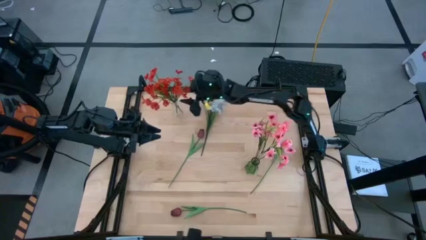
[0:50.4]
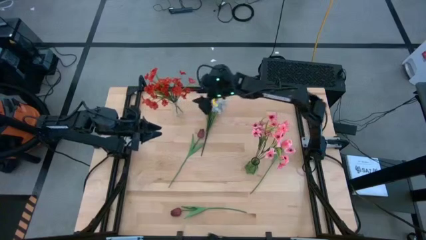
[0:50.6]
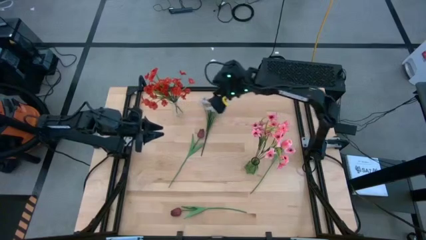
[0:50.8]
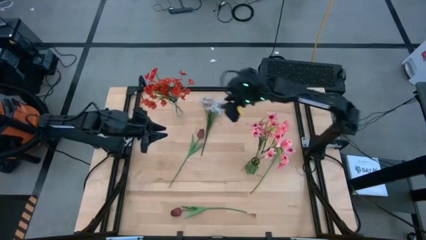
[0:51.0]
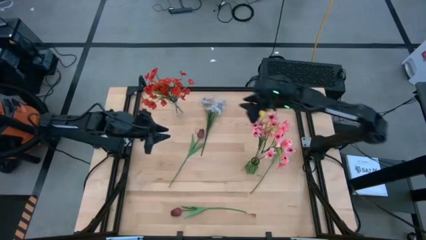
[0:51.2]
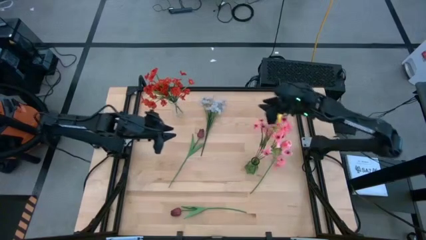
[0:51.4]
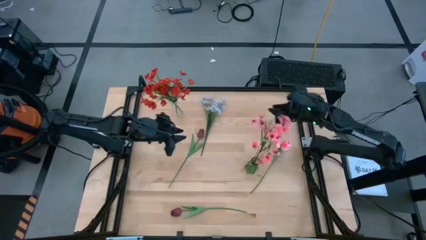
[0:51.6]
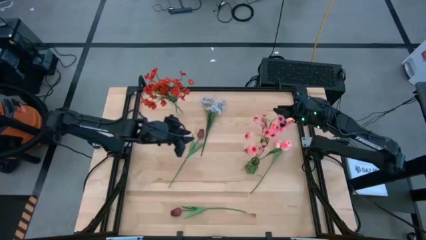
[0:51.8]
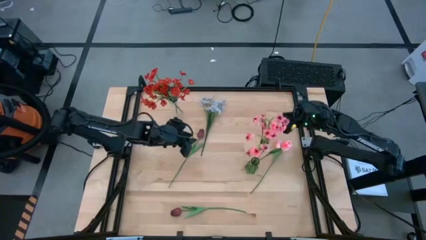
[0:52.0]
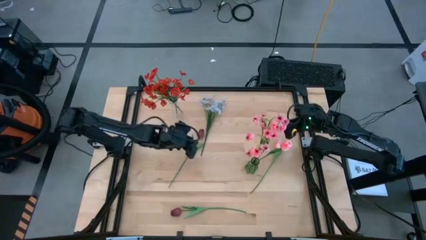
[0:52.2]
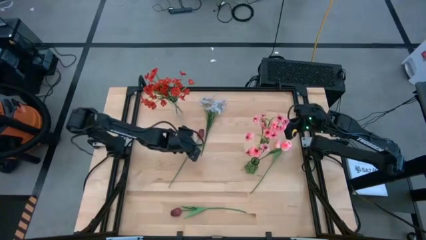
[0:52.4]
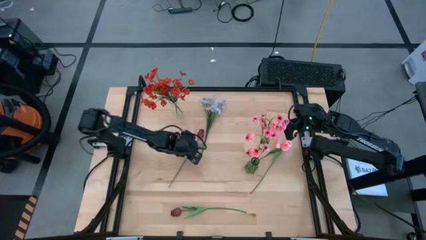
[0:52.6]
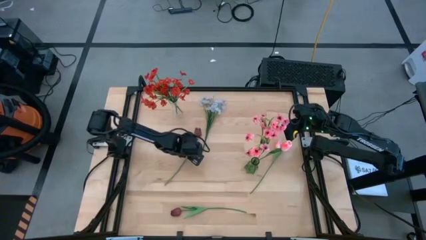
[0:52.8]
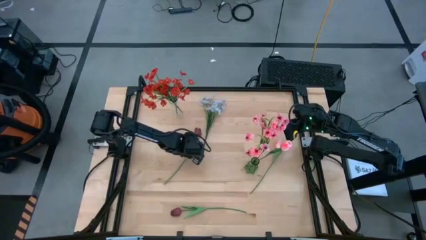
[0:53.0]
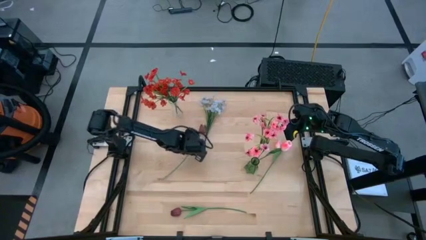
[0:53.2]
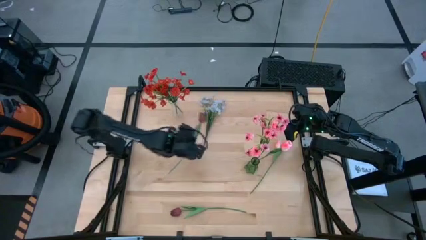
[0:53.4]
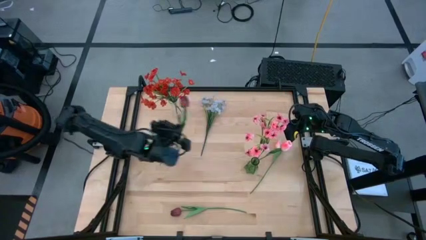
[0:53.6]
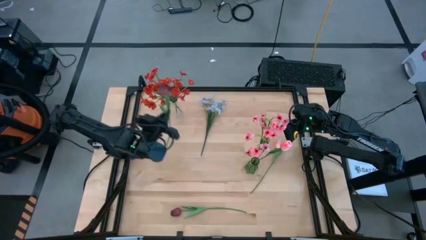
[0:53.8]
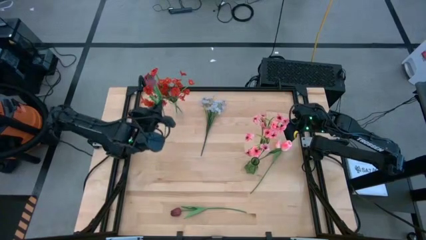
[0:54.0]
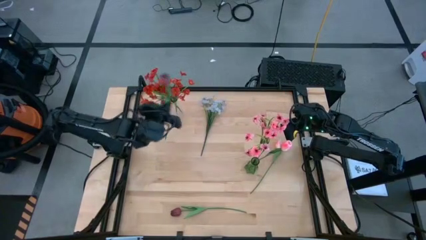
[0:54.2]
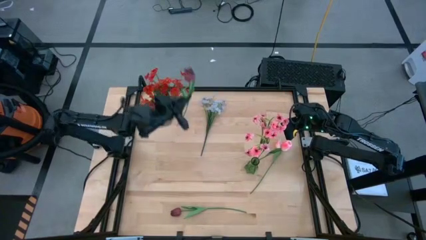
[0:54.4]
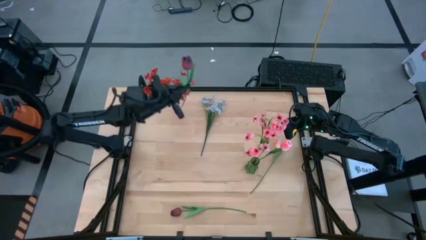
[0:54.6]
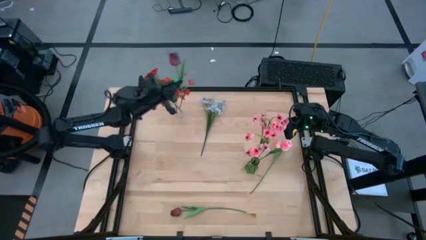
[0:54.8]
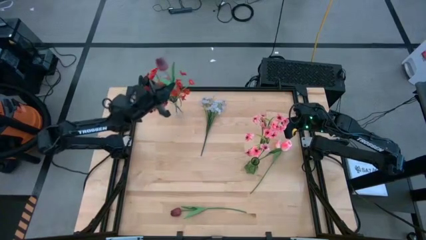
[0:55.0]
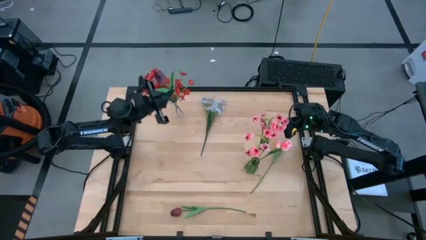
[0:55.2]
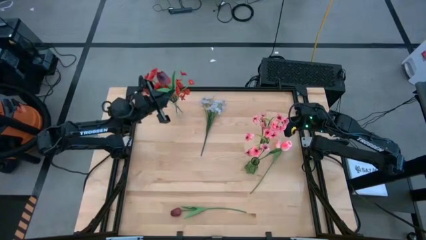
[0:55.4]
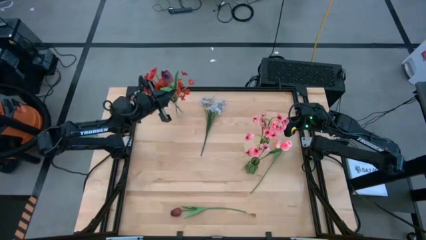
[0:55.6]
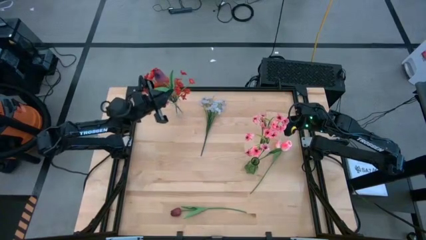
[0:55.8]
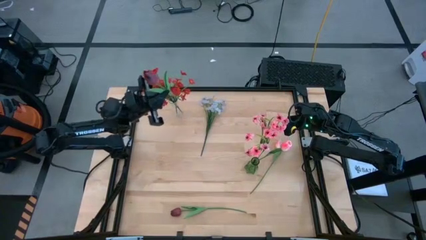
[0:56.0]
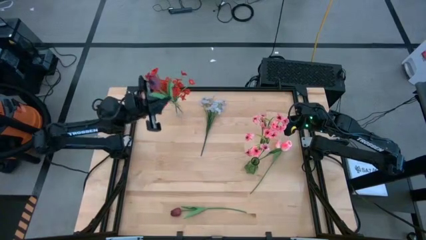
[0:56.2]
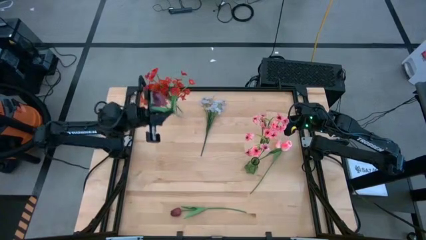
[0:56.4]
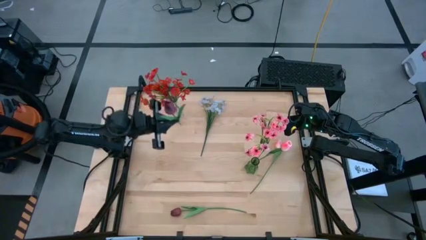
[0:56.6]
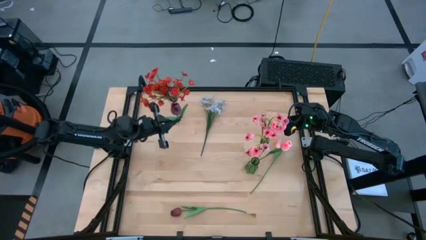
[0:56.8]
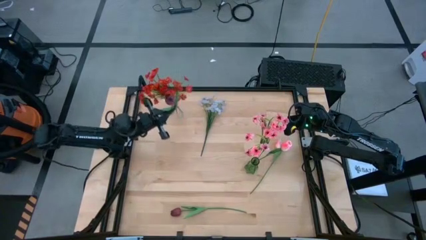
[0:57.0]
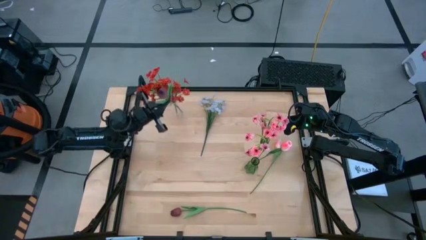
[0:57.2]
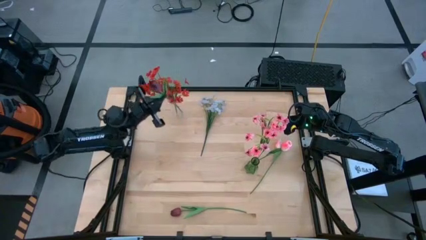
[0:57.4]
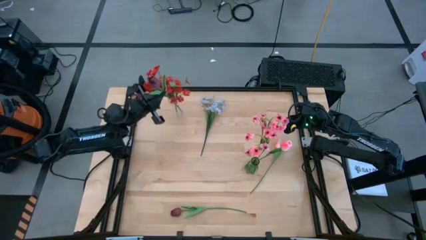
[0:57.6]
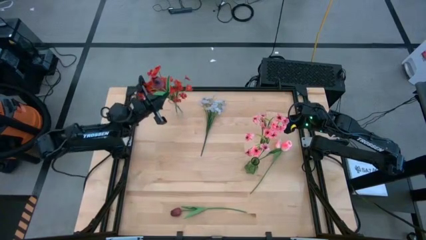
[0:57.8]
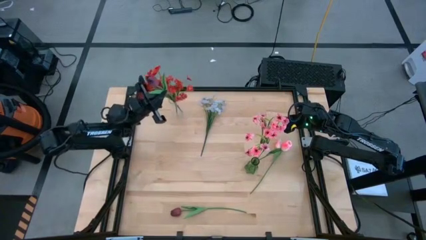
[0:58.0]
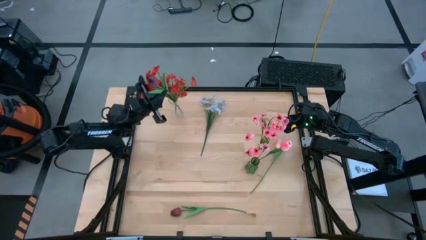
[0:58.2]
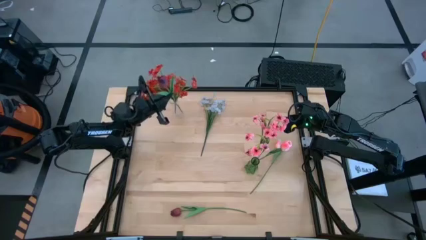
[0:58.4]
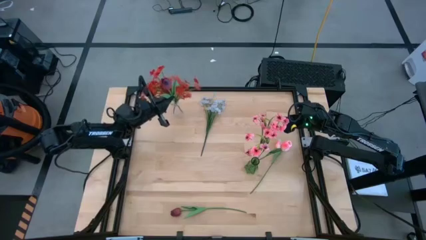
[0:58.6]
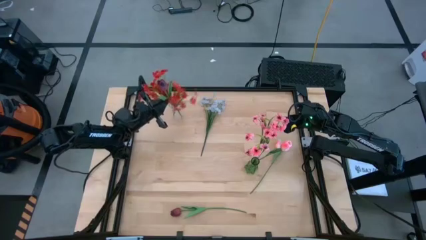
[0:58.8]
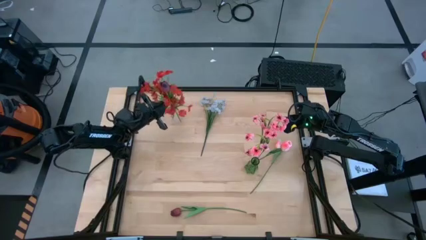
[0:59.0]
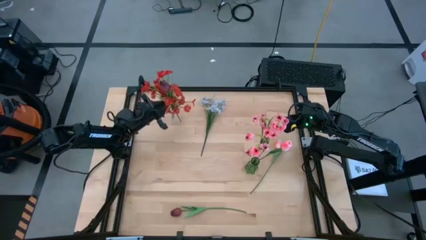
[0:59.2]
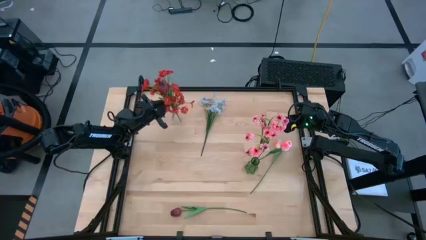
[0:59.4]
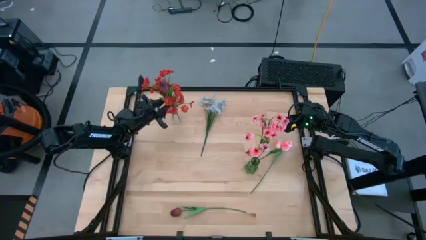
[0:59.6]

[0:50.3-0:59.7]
Task: Sort flowers into vase by color
Put the top dark red flower into the transparent vase

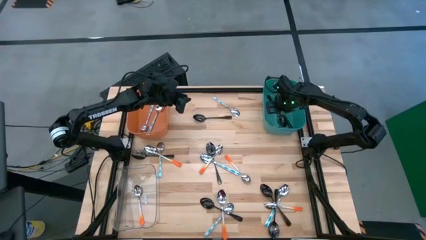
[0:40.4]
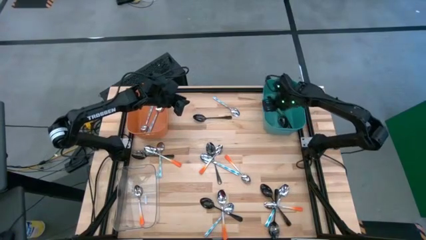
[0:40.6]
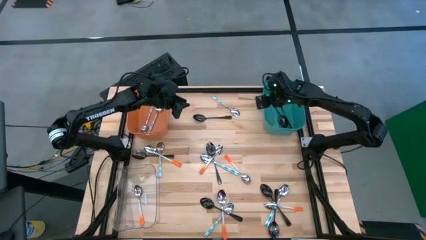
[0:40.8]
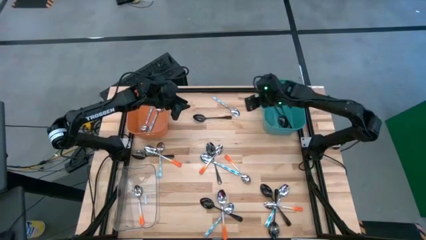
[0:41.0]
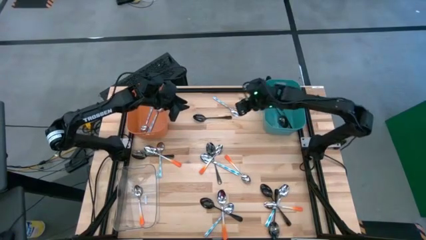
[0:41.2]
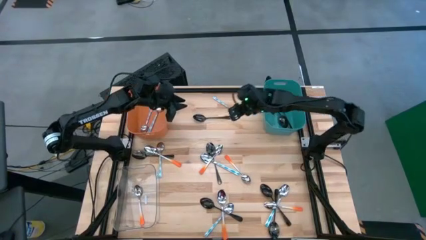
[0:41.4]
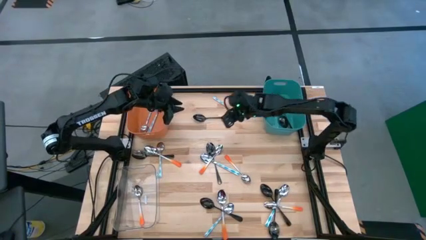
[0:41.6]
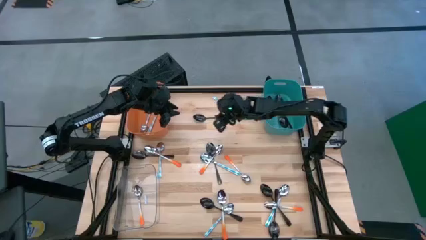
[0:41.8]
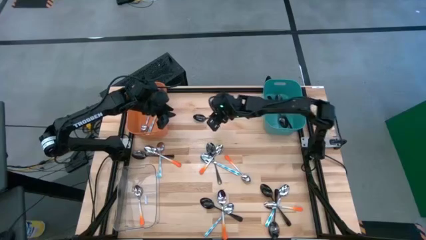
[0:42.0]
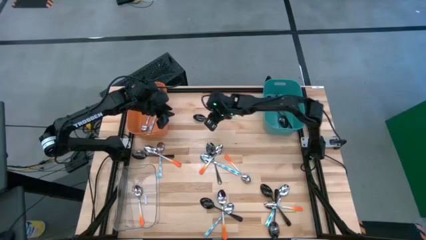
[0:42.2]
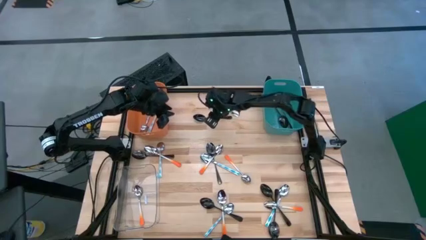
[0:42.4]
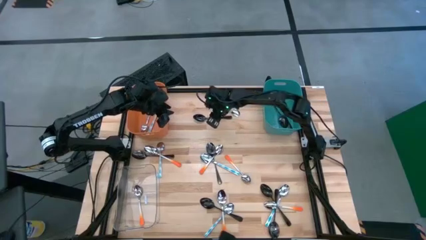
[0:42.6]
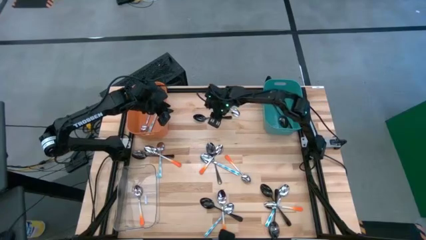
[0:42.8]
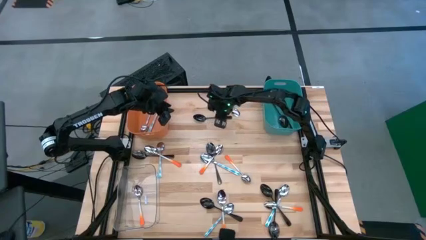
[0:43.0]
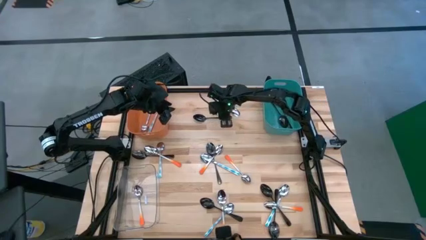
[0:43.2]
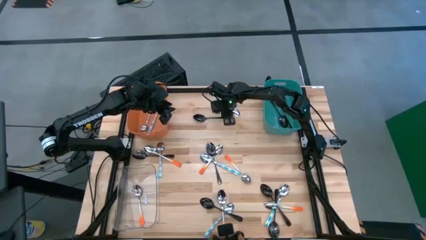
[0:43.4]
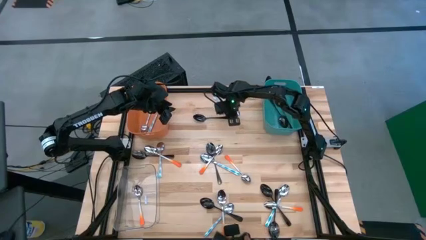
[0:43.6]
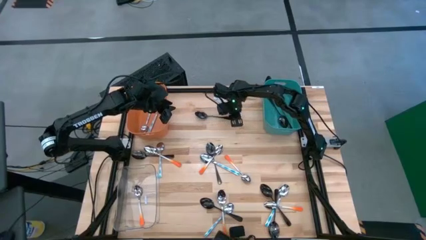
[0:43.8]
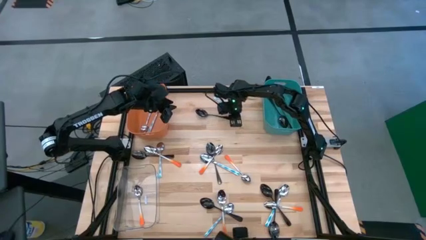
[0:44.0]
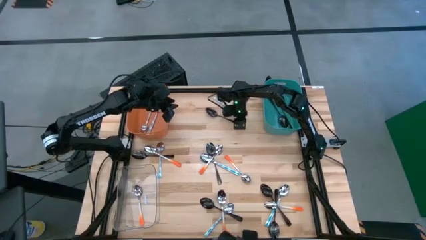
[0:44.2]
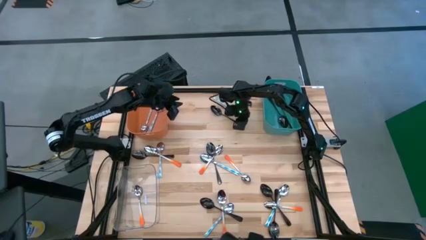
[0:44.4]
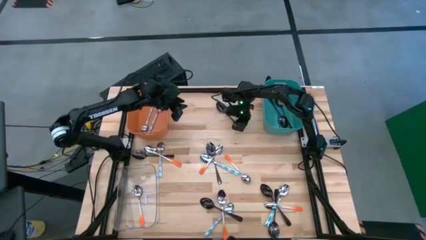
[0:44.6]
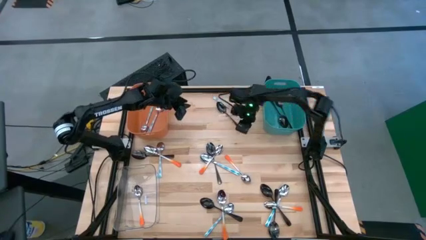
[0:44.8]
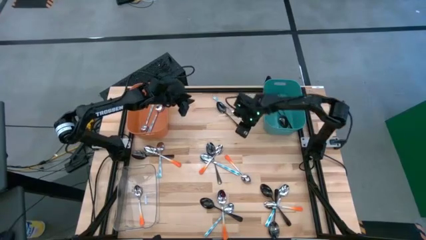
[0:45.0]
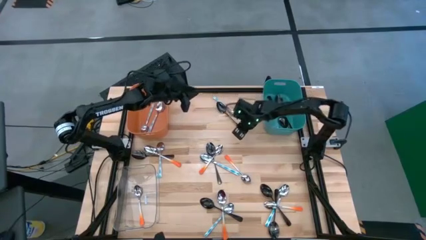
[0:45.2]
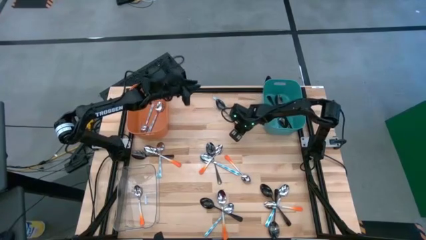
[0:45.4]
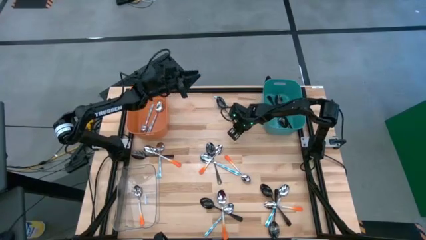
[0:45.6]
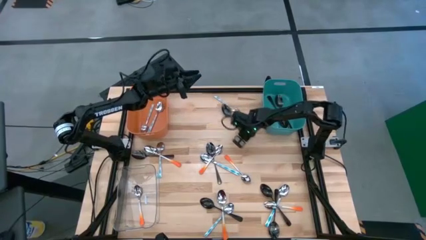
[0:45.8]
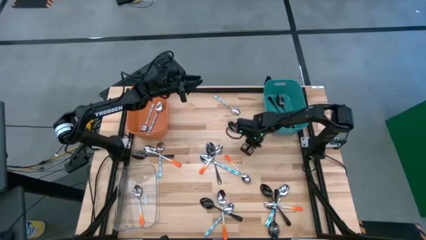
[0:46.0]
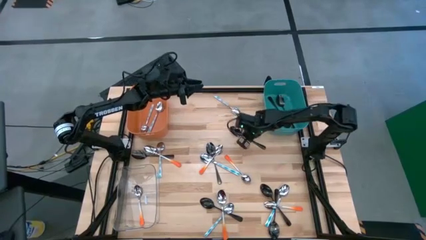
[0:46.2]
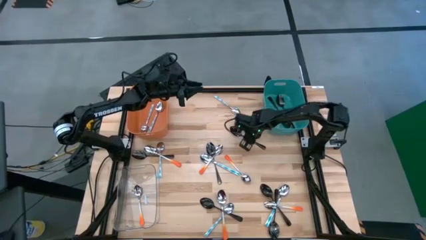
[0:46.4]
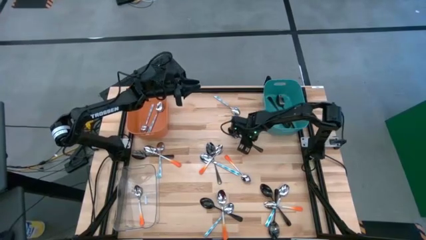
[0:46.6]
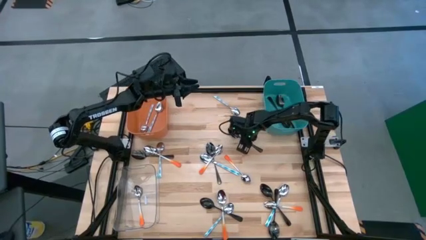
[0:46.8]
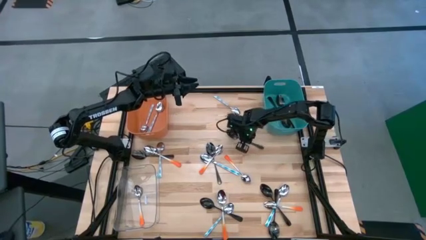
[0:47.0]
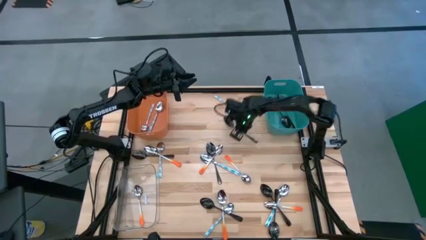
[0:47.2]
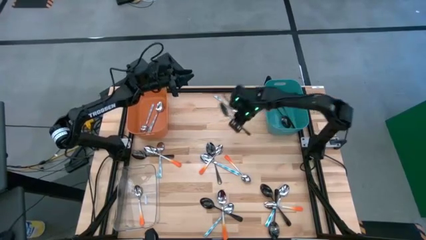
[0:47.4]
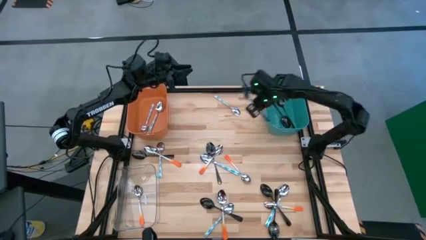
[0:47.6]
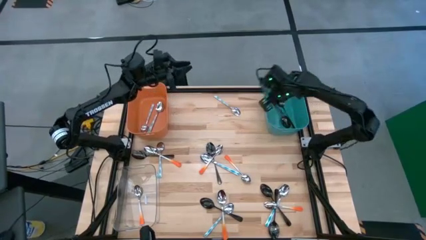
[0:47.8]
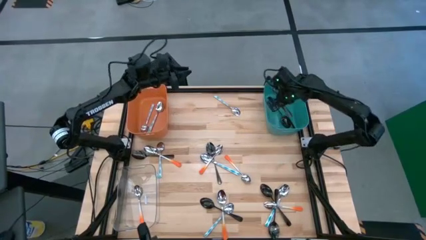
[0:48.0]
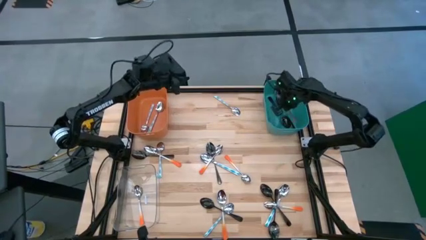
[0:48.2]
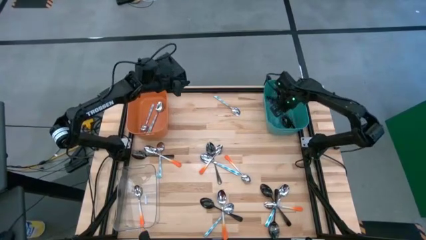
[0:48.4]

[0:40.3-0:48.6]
Task: Sort silverware by color (type)
Put the black spoon into the green bin
